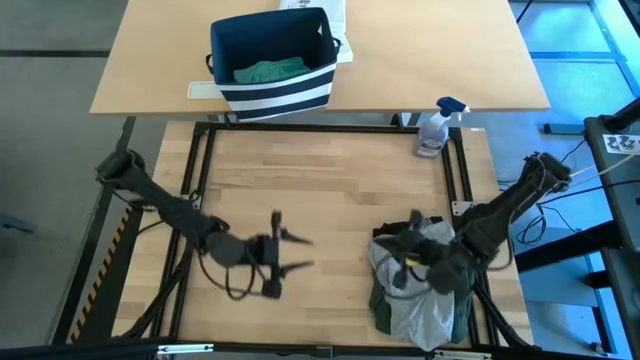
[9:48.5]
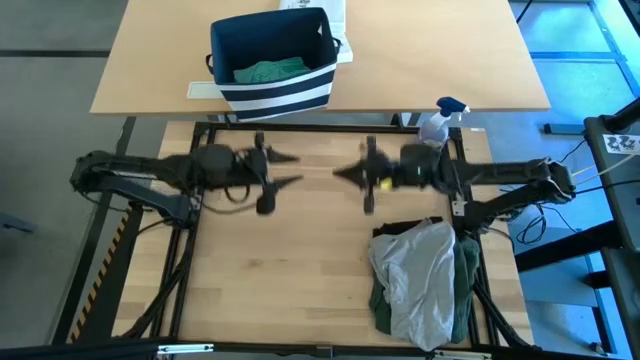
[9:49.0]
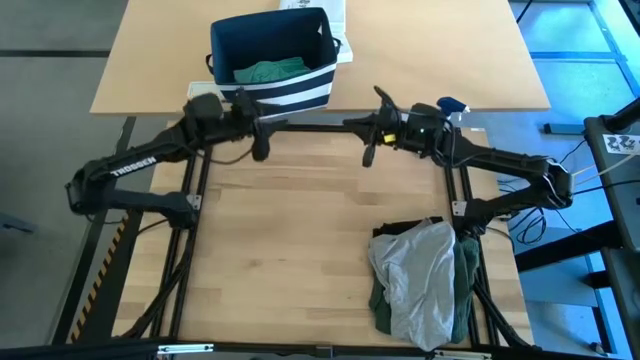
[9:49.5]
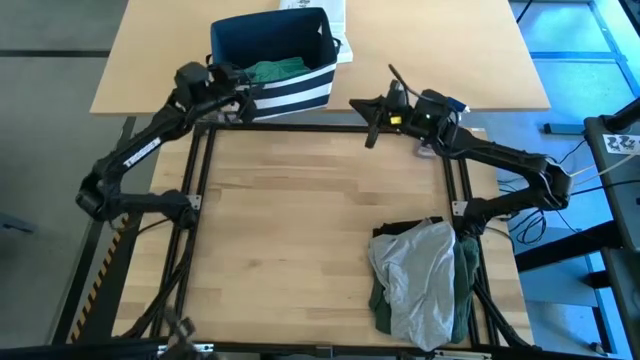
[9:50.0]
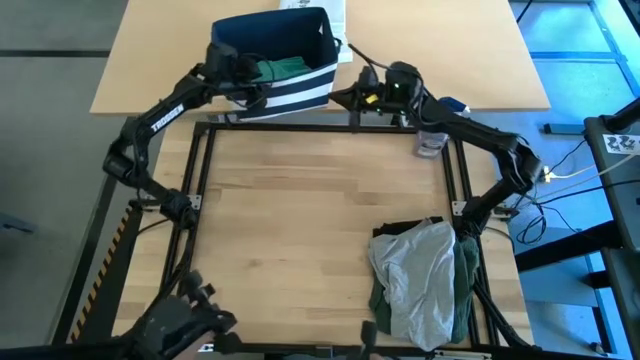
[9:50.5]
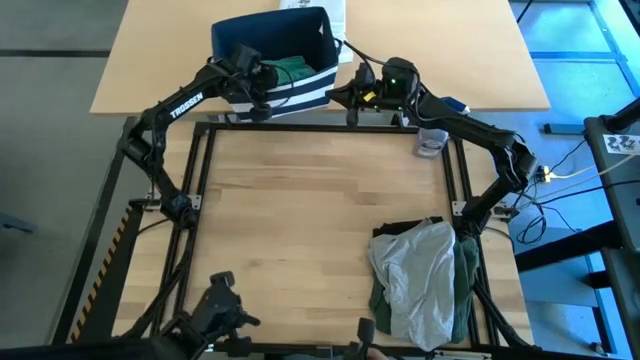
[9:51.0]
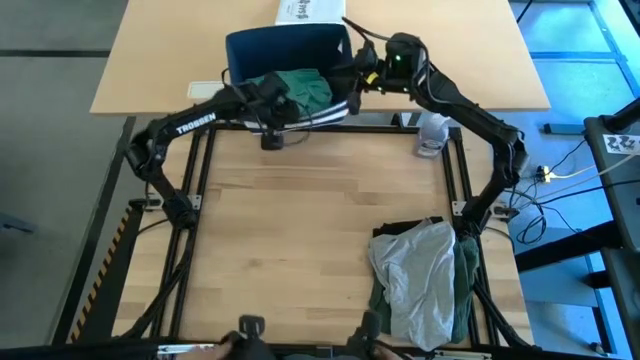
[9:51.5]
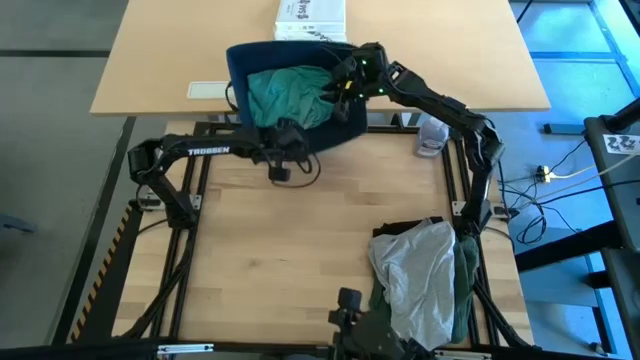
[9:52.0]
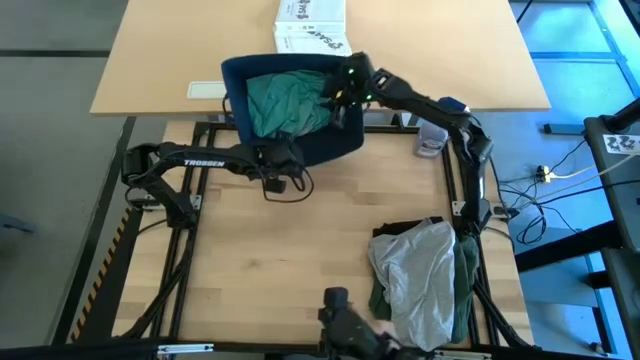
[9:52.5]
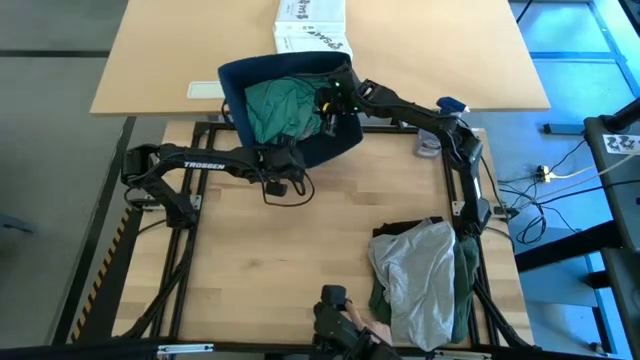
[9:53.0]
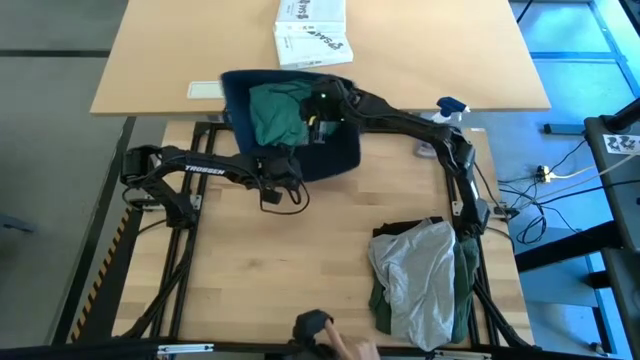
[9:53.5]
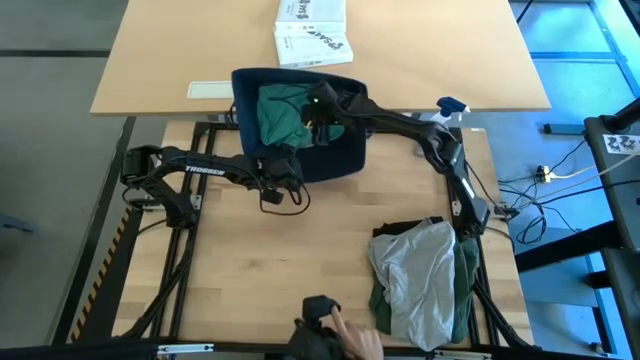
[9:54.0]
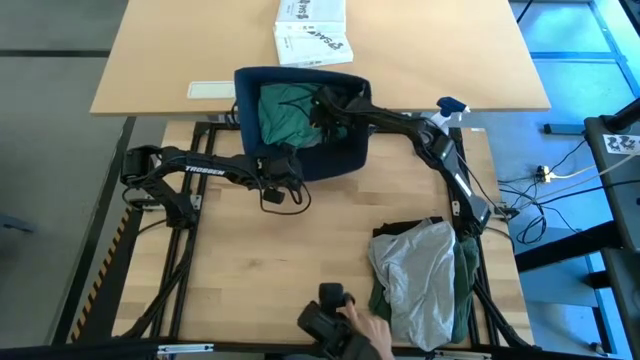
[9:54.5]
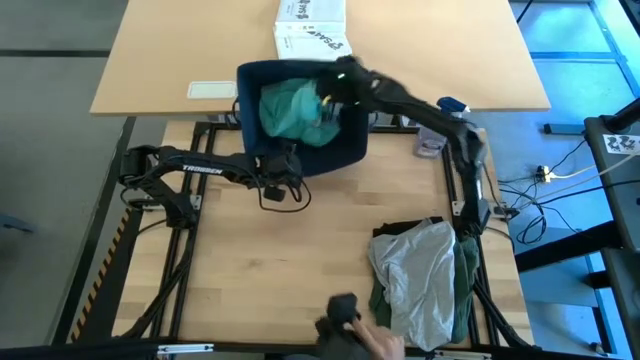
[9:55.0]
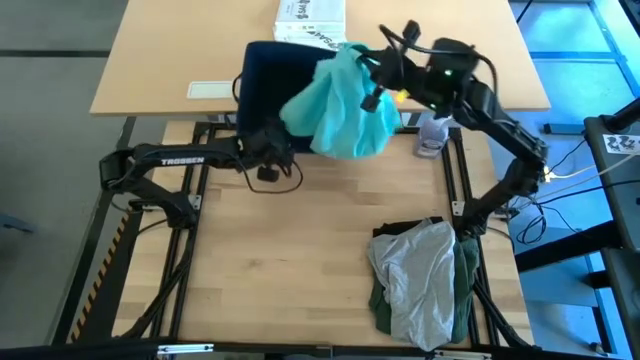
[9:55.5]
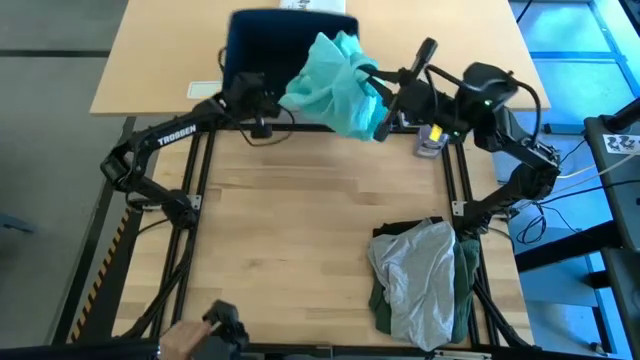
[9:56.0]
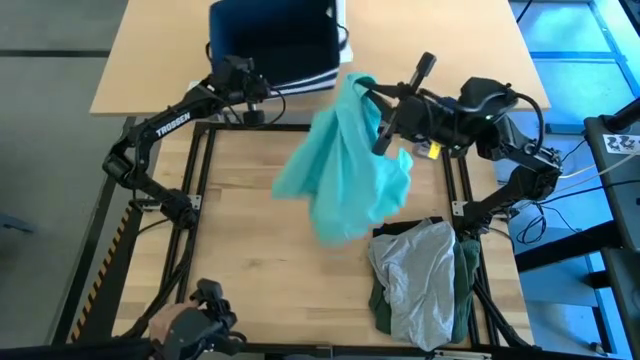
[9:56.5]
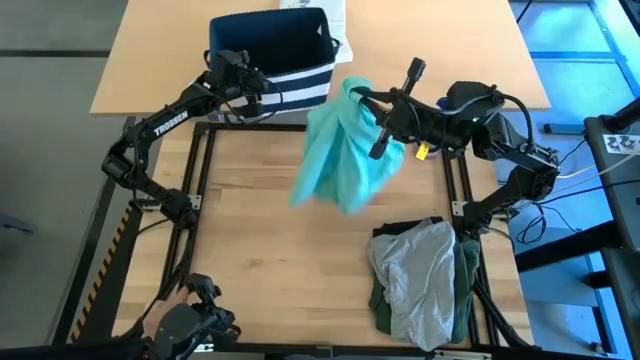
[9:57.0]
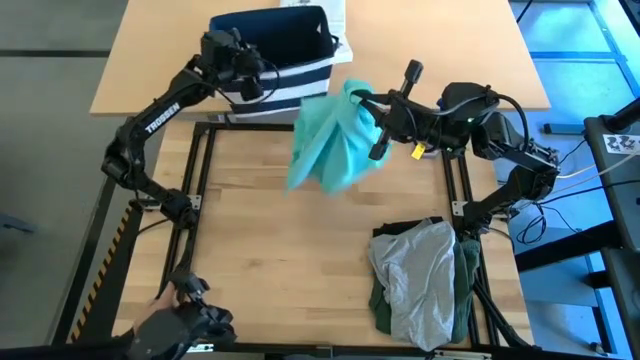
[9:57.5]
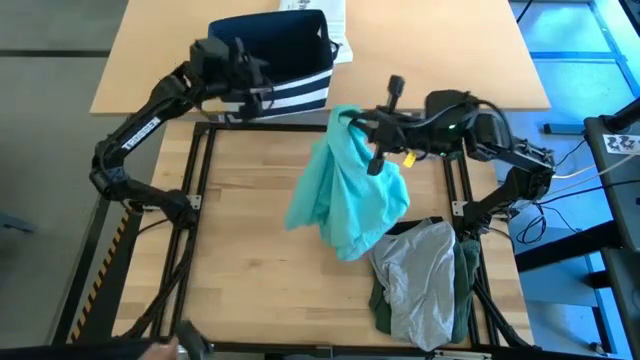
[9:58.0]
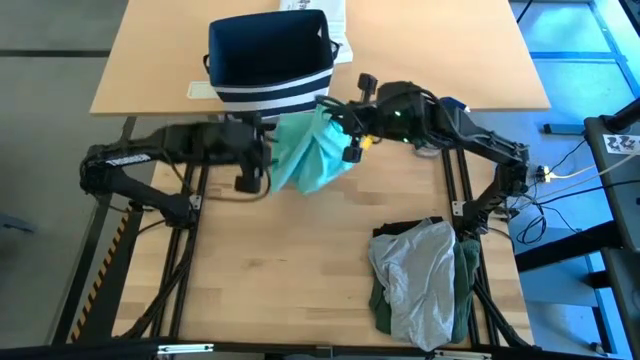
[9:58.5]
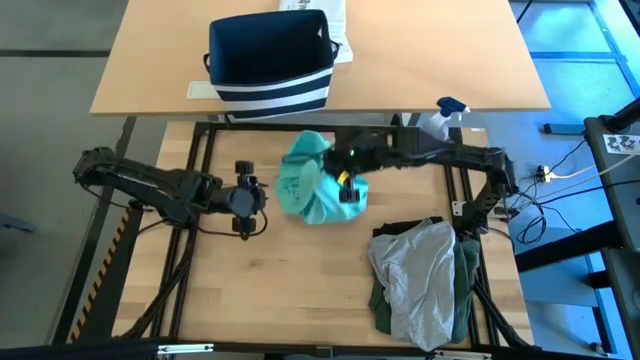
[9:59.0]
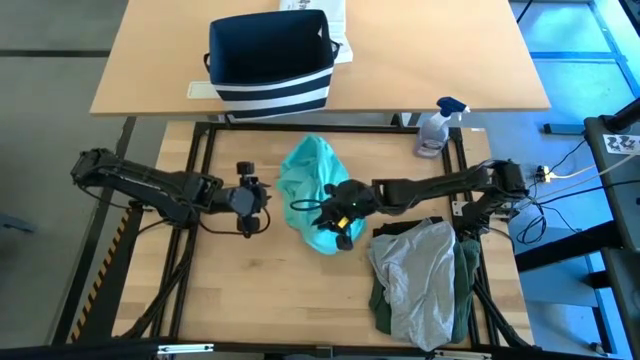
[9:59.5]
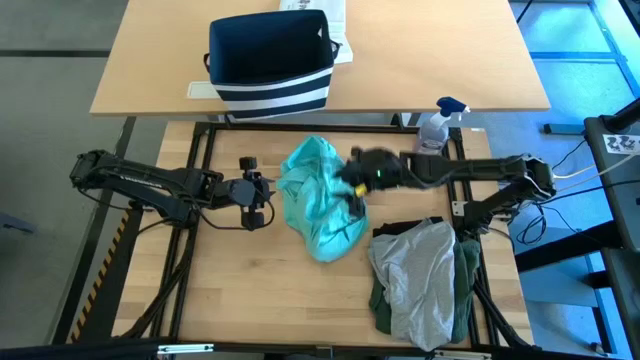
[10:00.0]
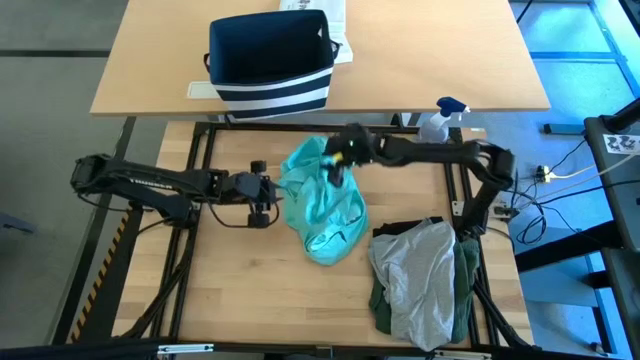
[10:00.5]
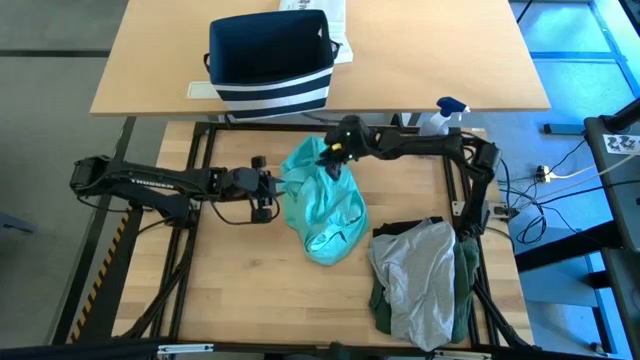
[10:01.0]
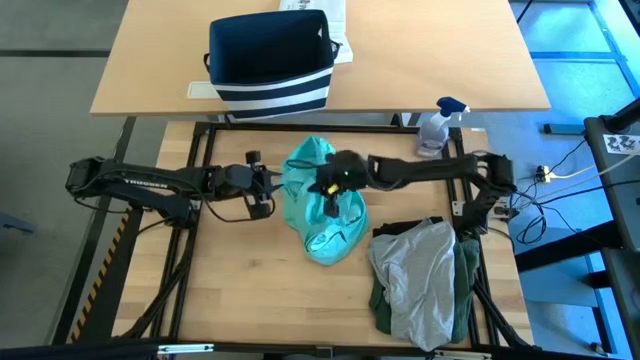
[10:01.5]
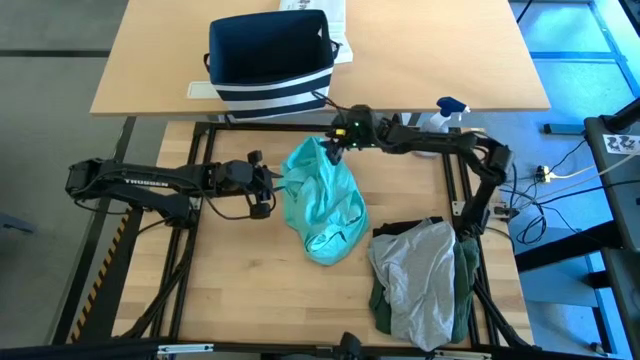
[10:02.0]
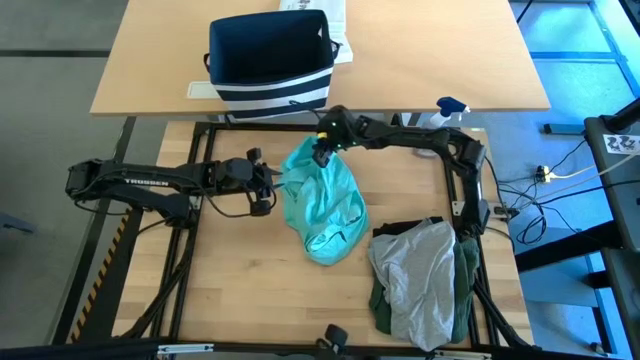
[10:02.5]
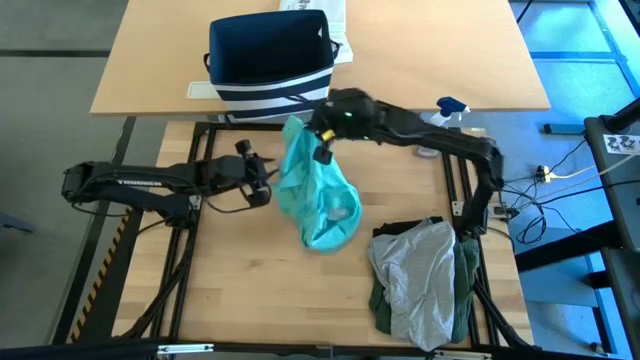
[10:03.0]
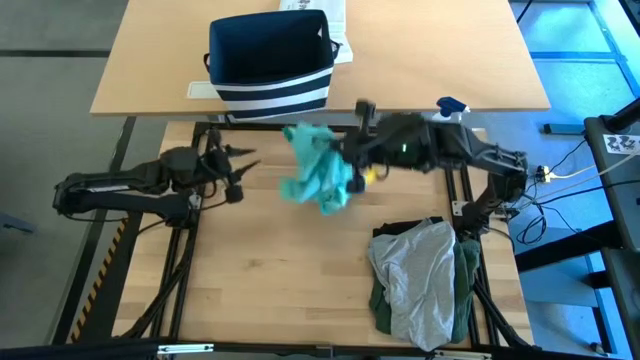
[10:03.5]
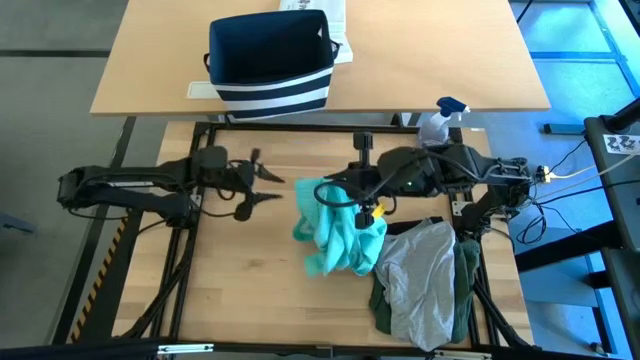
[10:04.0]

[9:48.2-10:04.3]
Task: Fold Laundry from Bin
Fold the blue shorts

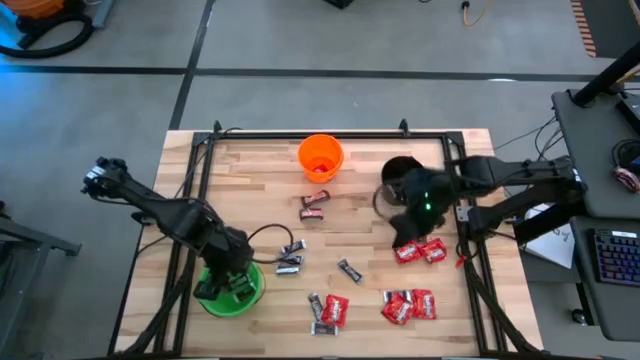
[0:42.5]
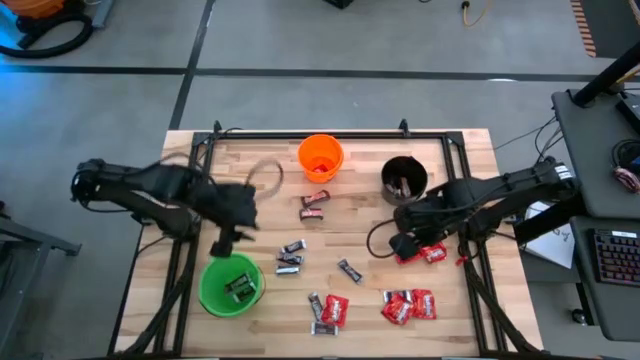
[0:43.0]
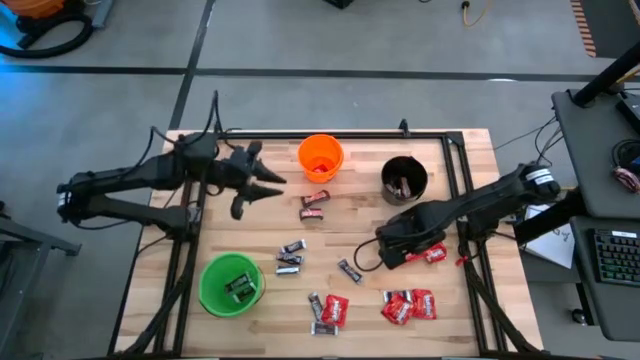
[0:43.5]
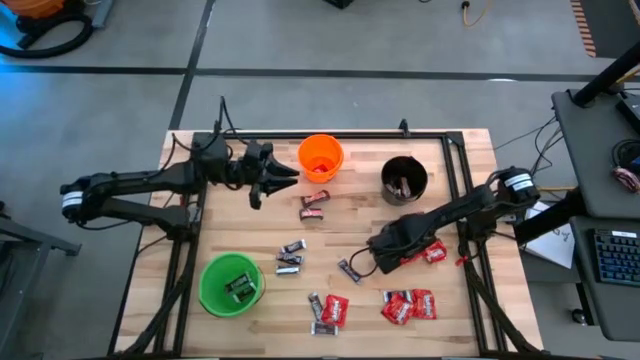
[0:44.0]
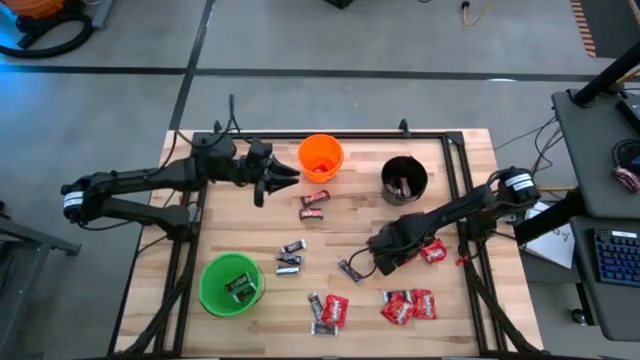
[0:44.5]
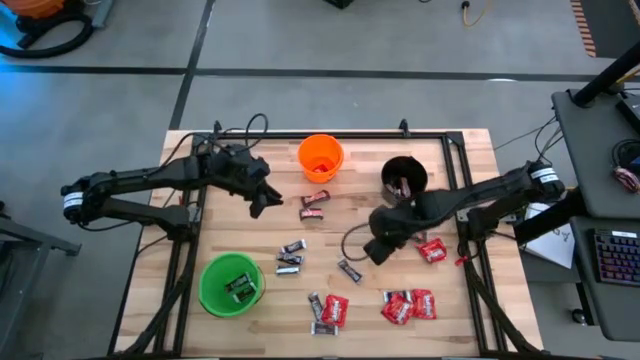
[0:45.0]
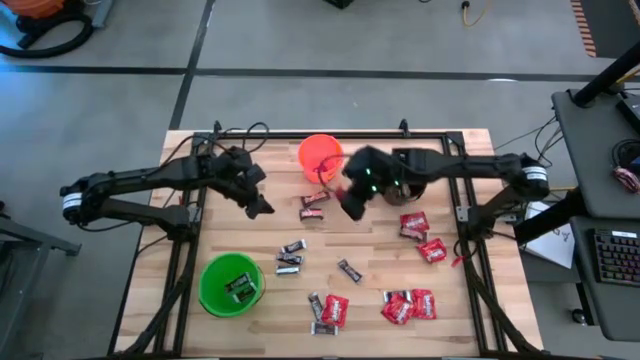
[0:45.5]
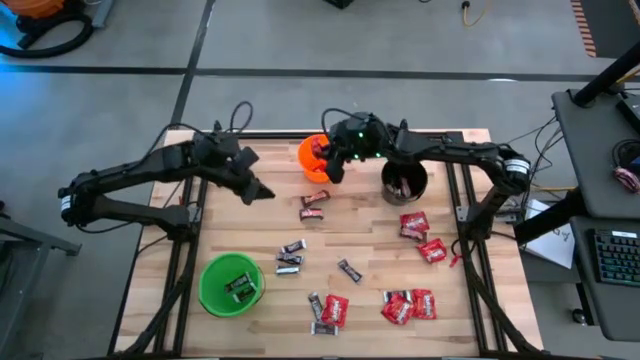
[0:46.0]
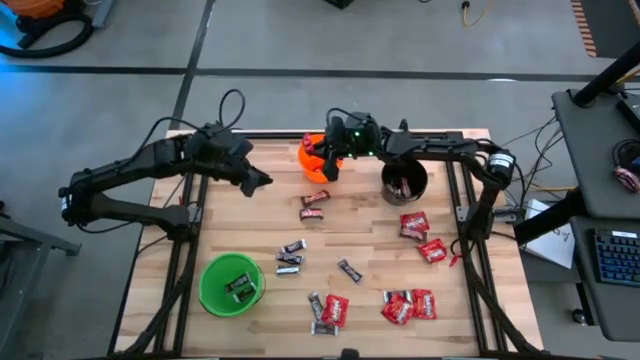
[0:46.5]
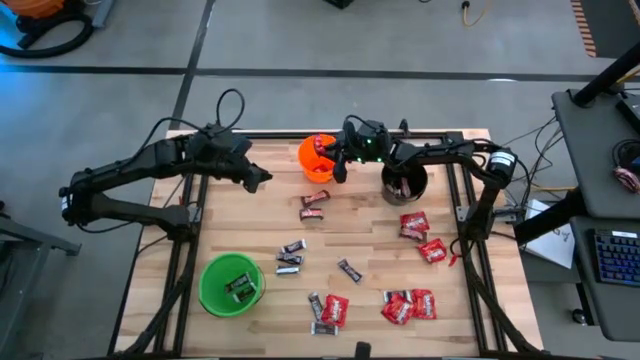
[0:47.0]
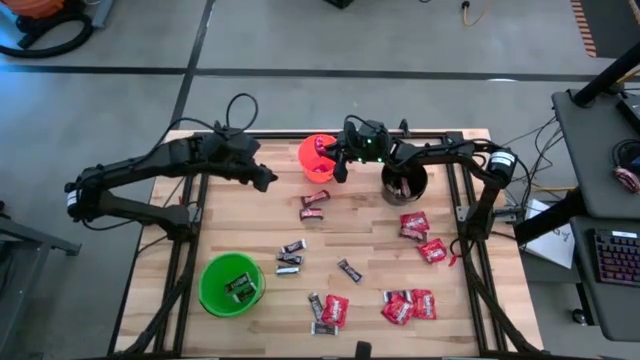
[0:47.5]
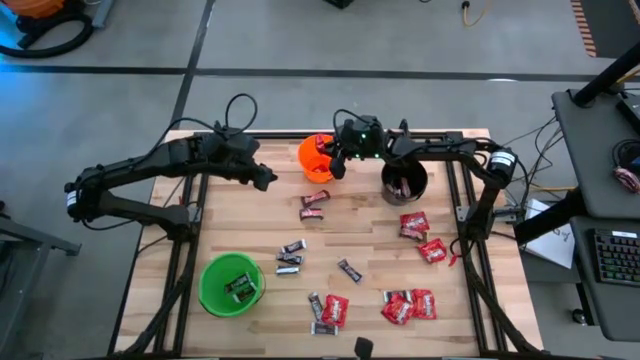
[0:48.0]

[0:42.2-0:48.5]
Task: Sort candy
Put the red candy into the orange bucket
